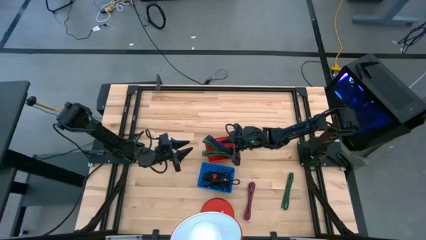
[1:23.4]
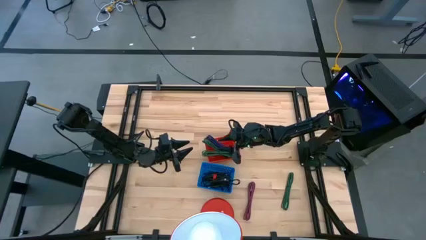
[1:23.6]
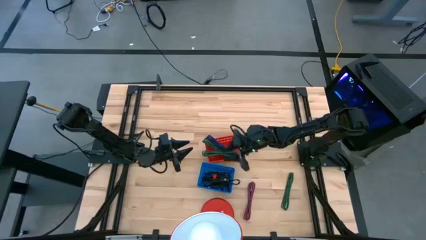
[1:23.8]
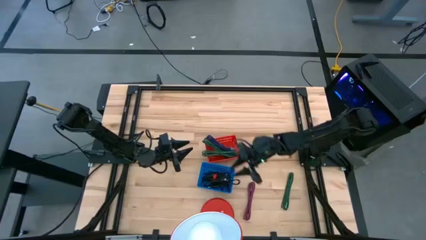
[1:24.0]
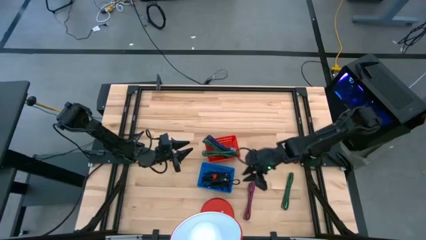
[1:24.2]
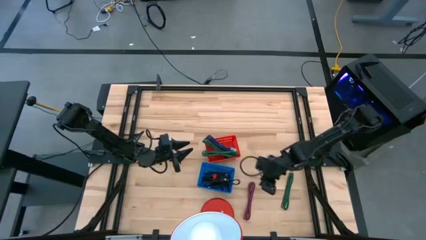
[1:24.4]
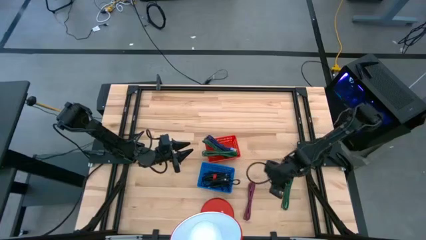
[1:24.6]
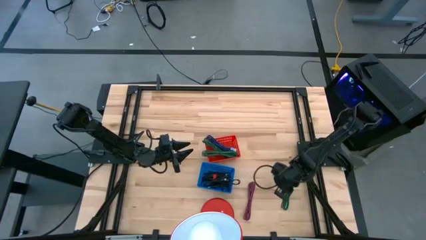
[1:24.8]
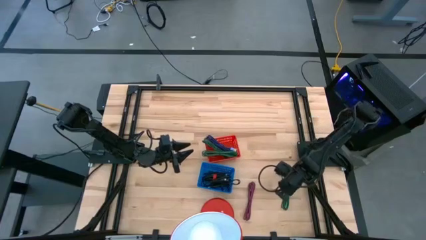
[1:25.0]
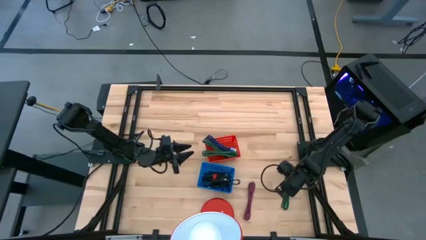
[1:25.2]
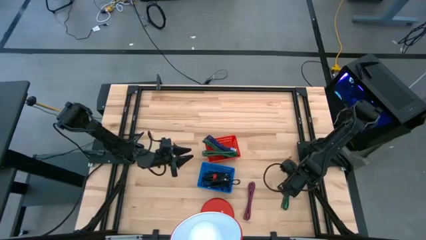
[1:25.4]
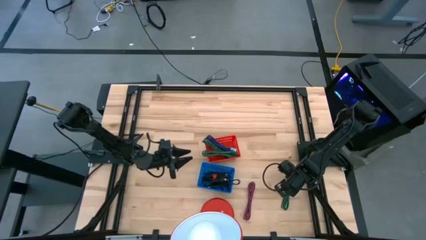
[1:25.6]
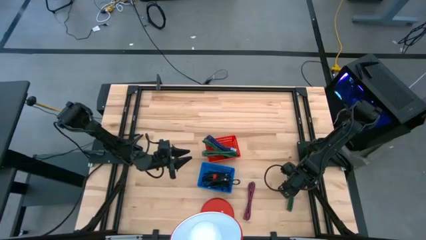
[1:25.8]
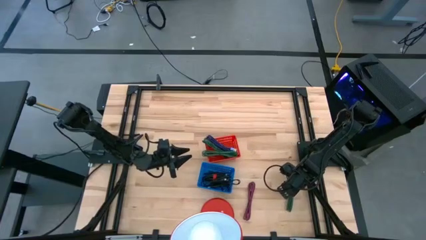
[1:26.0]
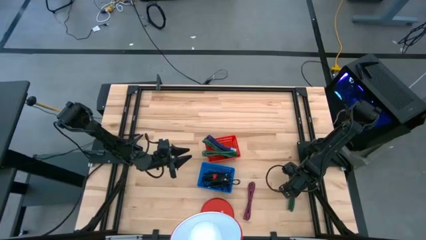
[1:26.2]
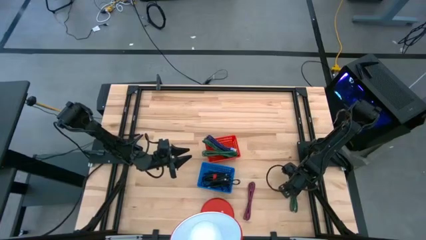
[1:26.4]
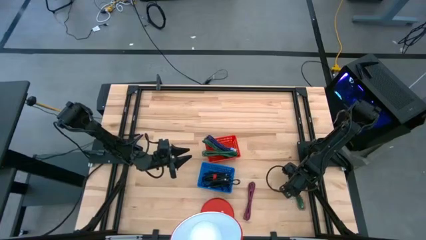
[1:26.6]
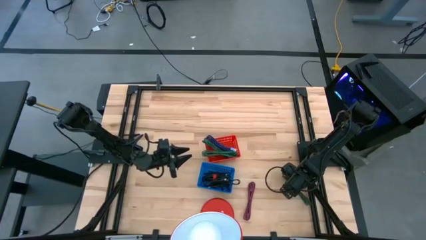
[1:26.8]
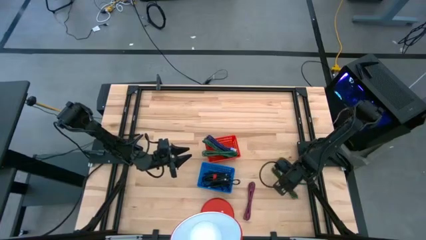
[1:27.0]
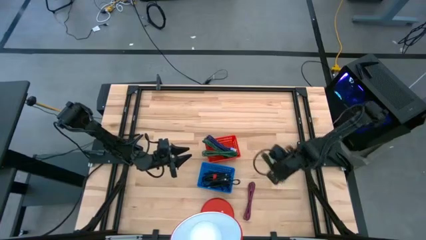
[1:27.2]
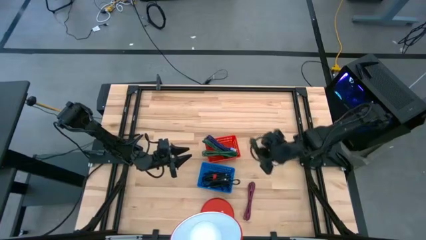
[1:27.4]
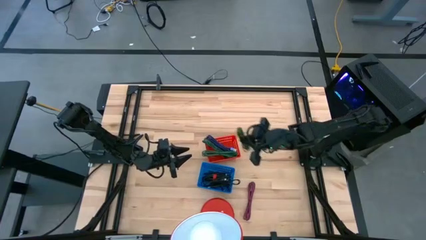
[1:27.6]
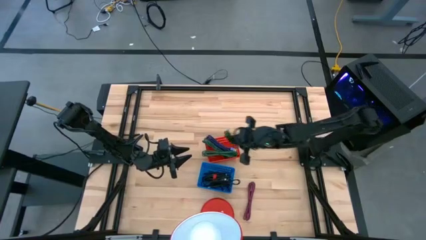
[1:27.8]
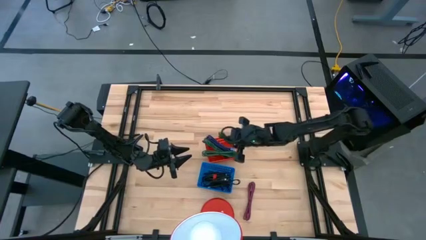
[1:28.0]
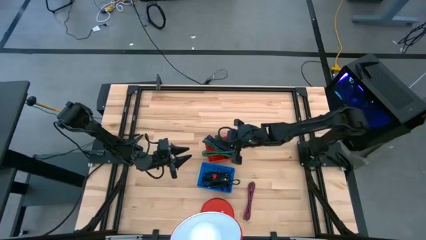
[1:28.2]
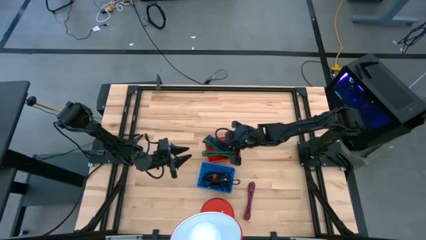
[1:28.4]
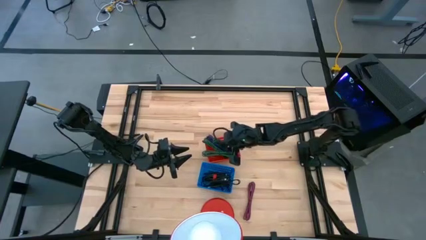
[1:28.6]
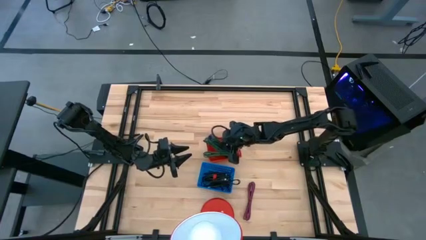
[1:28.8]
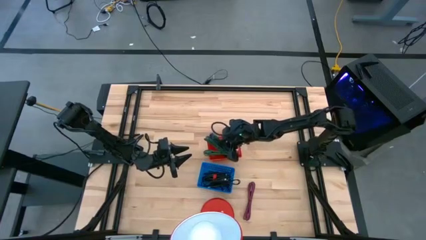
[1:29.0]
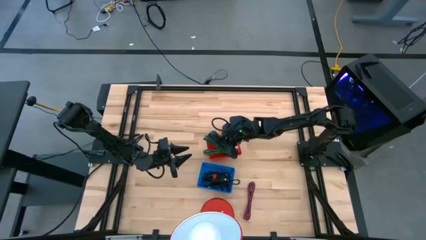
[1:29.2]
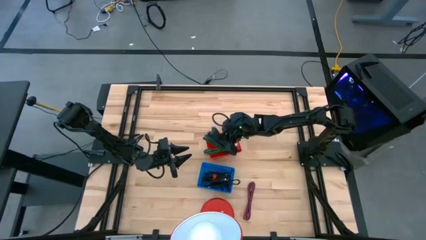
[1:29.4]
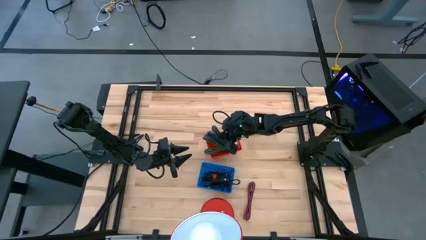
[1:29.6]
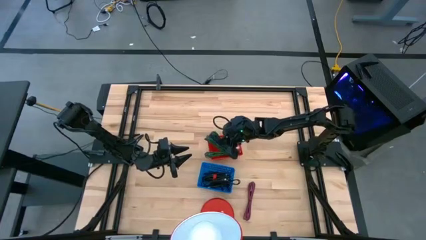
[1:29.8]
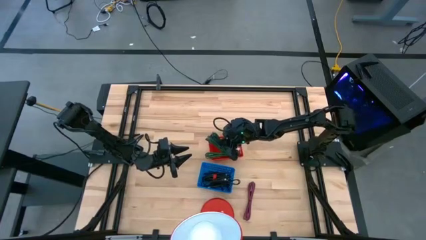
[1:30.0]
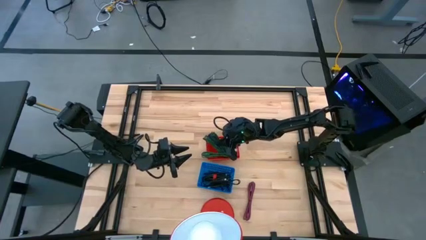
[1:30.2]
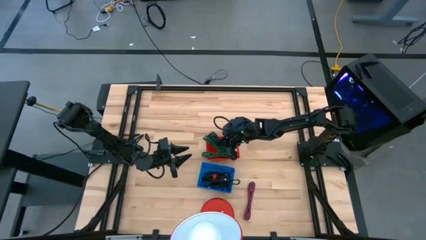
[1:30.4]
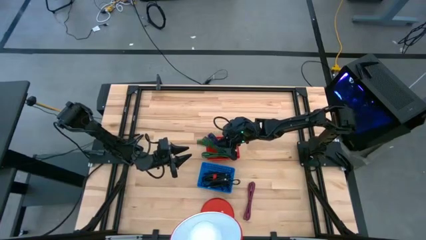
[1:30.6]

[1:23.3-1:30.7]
Task: Pick & Place USB Port
Put the large green USB cable into the red bin

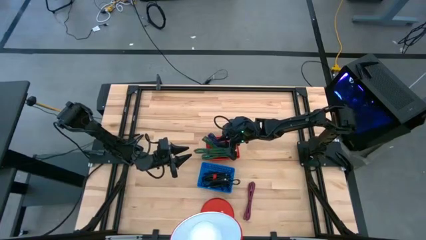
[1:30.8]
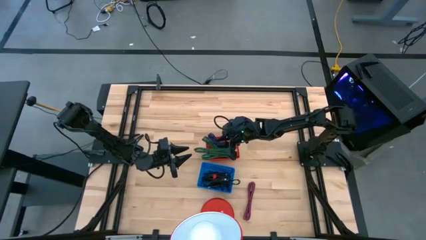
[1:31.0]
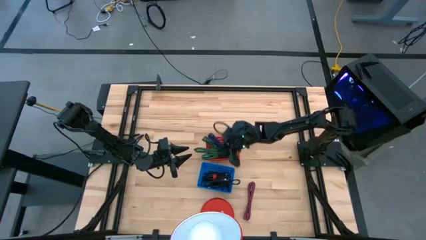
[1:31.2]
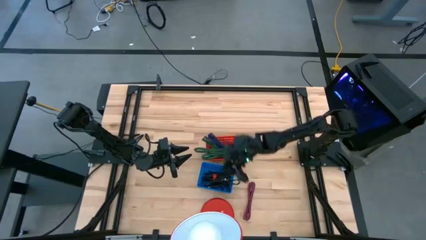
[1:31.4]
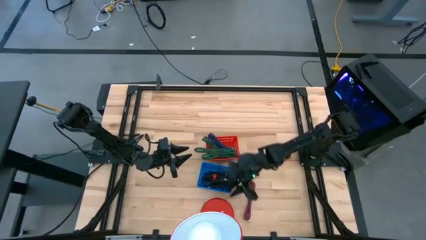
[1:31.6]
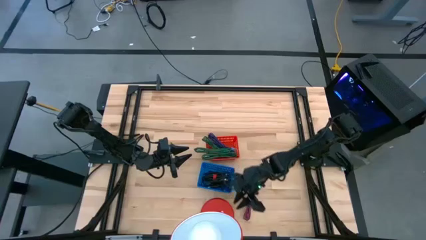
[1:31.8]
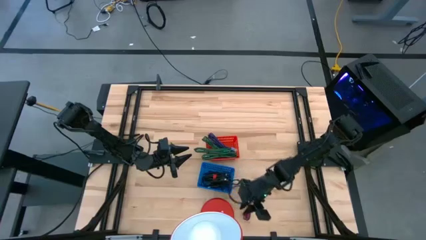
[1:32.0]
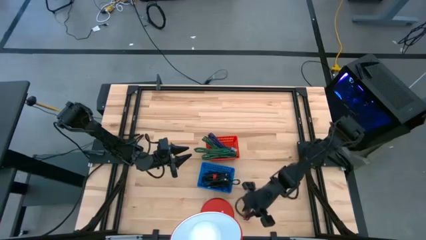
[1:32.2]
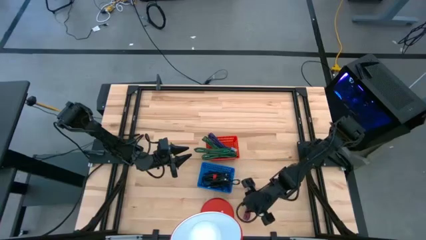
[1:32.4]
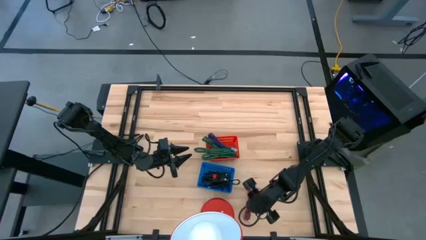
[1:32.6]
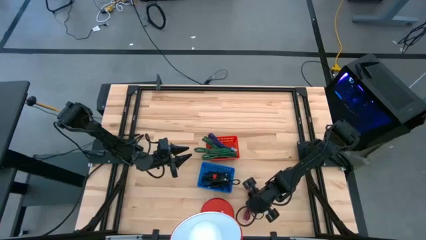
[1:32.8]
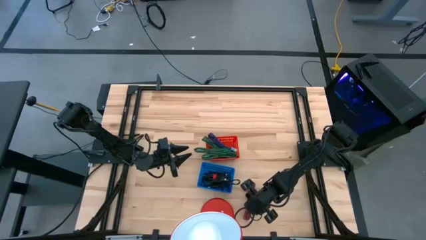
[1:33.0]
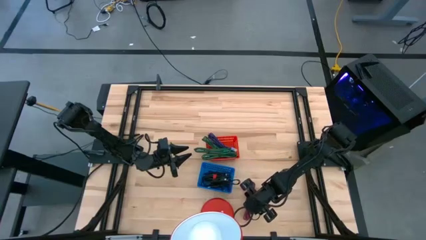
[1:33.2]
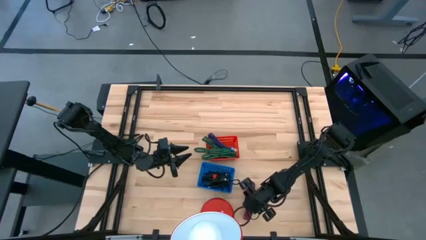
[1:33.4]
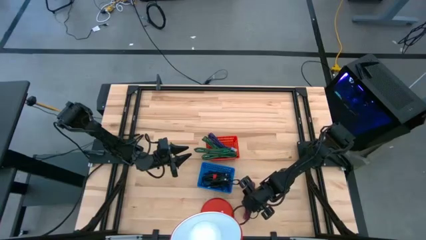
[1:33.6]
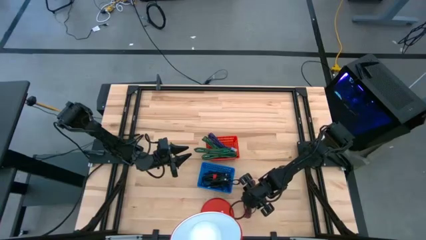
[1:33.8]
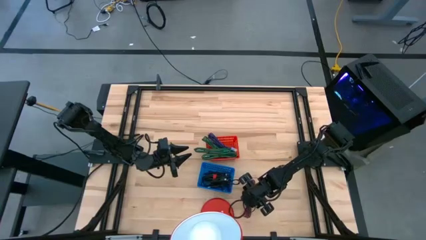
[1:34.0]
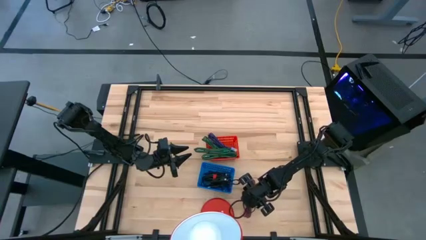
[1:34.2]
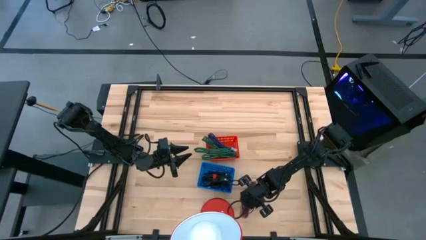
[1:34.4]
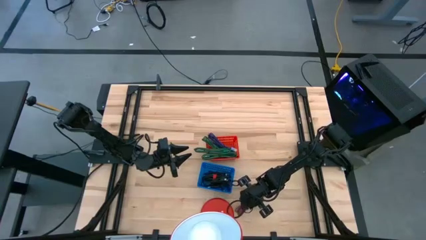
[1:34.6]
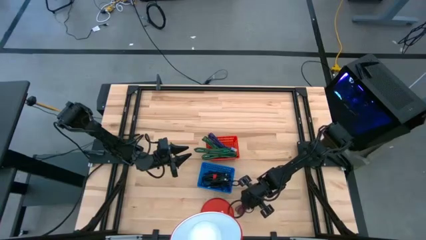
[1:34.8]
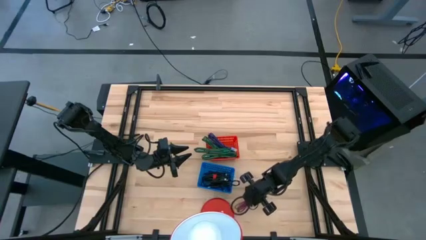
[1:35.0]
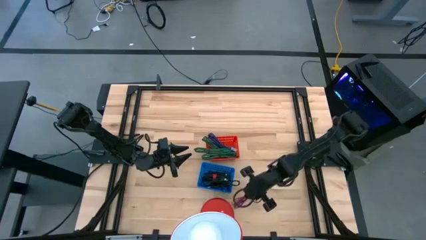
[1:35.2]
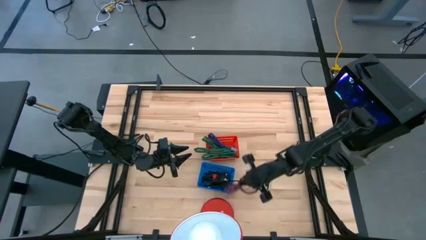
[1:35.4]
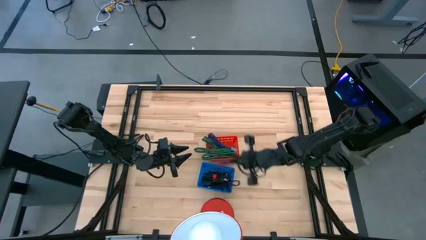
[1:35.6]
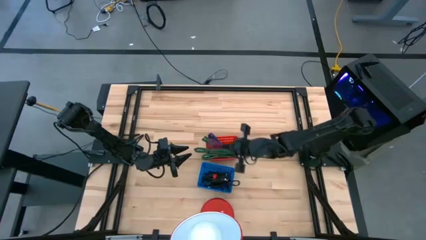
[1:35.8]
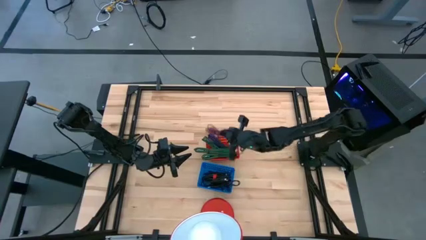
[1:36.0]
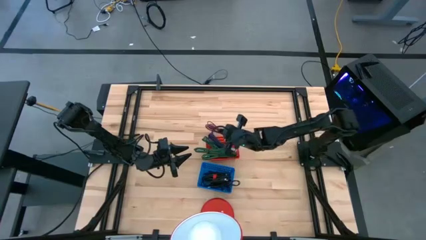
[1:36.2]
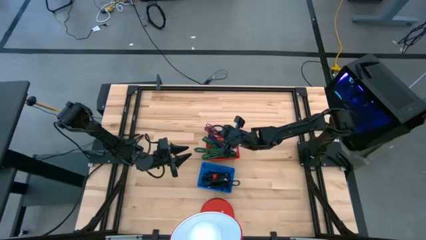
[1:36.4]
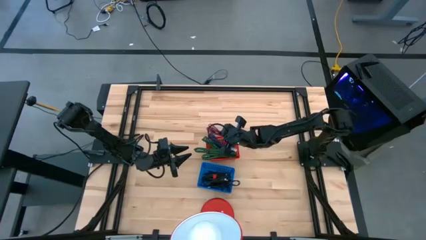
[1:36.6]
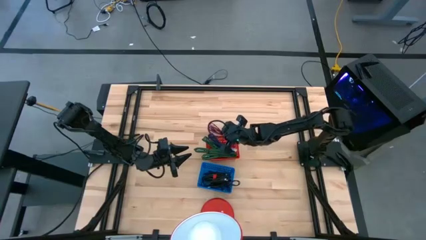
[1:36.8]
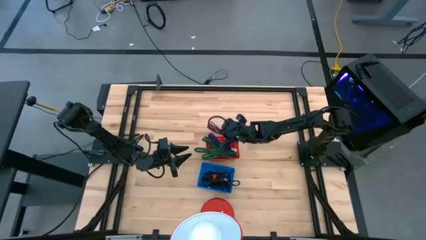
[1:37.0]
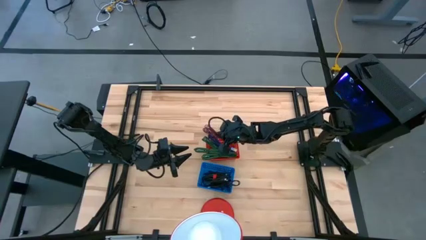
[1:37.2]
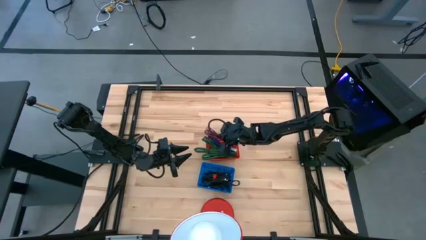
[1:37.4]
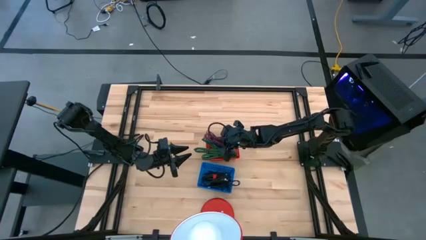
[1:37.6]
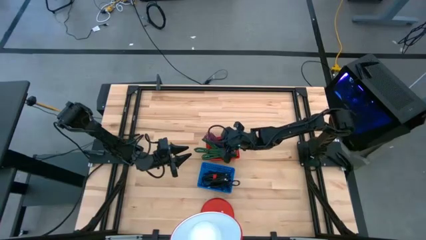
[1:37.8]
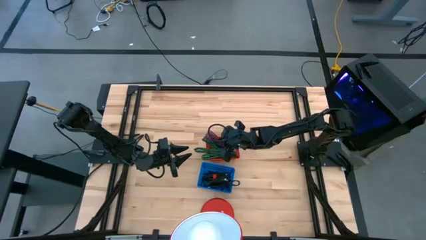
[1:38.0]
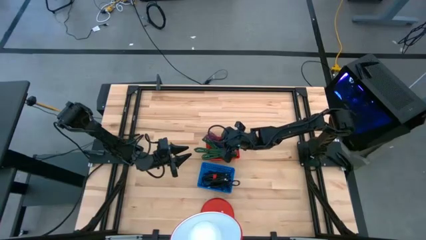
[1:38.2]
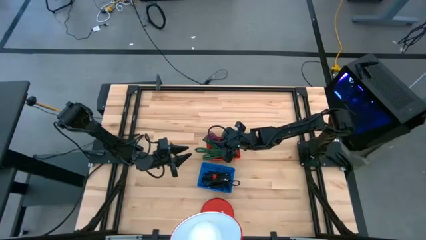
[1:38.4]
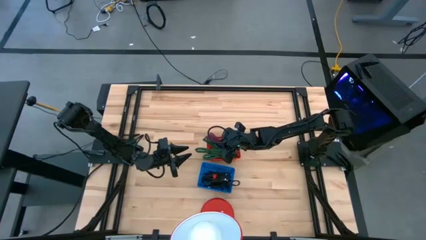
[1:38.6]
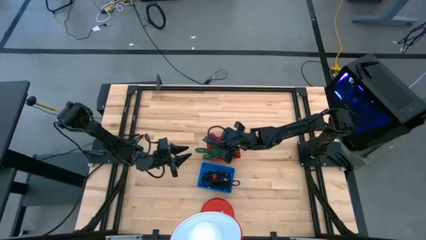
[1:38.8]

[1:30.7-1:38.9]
Put the large pink USB cable into the red bin
